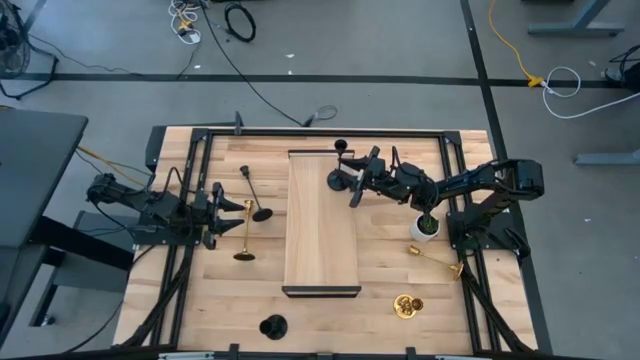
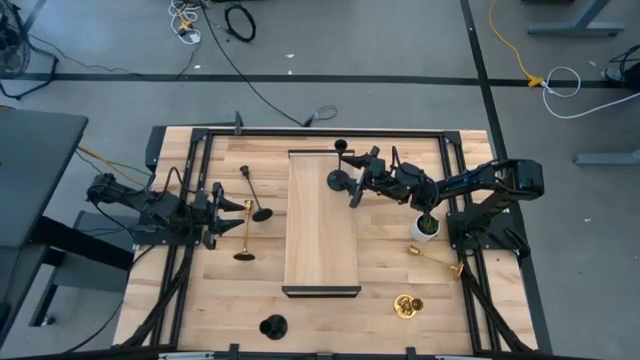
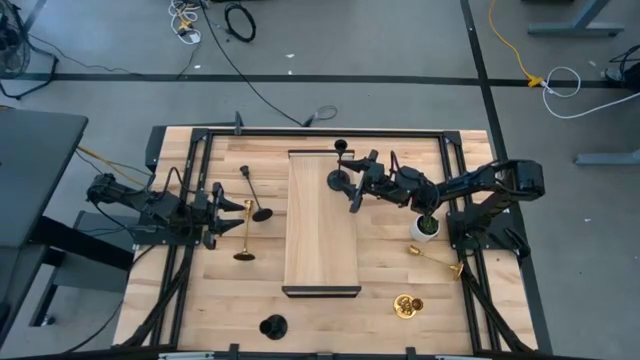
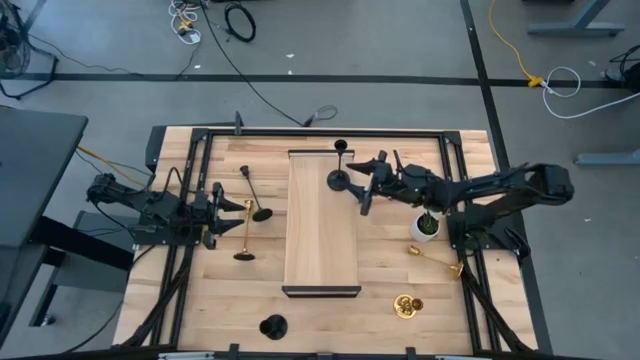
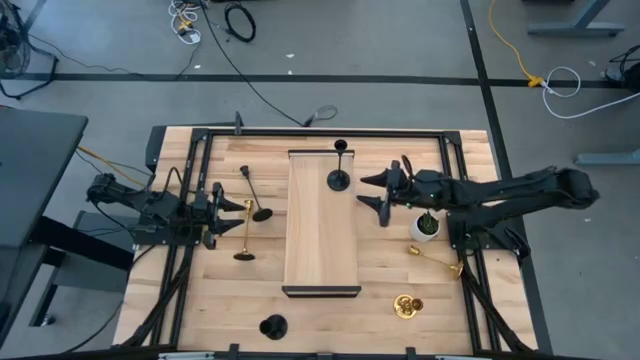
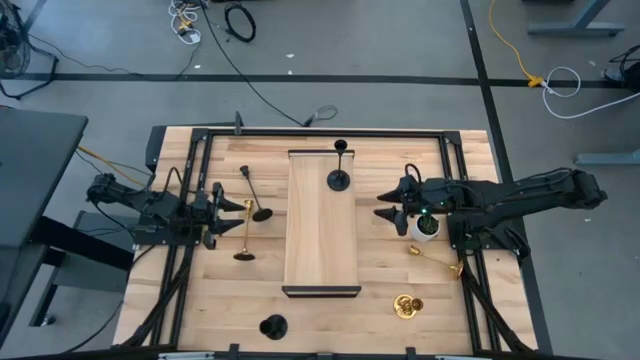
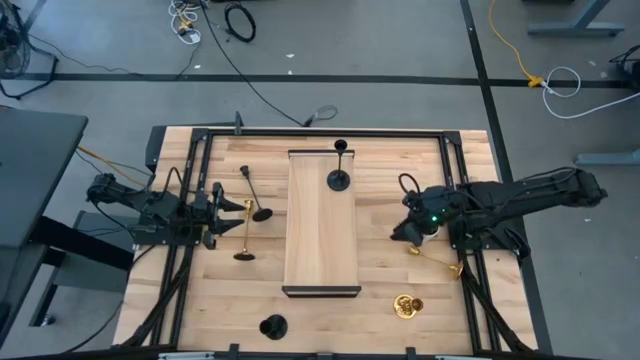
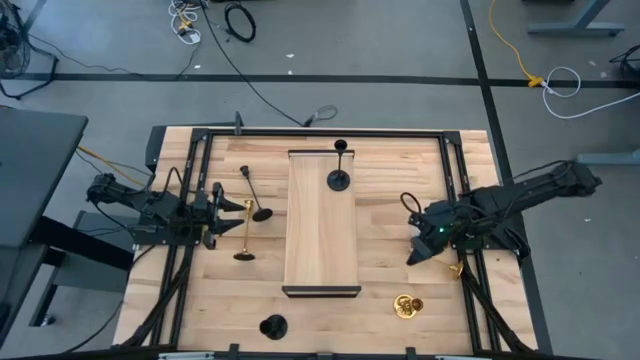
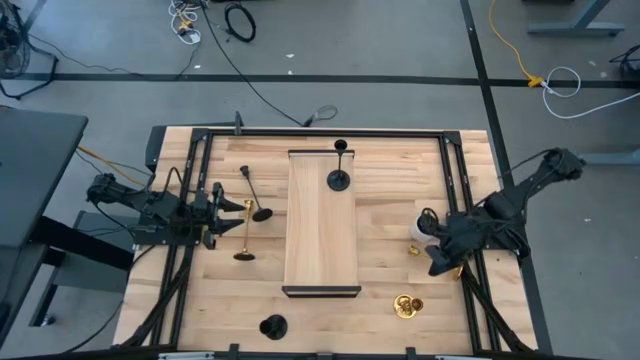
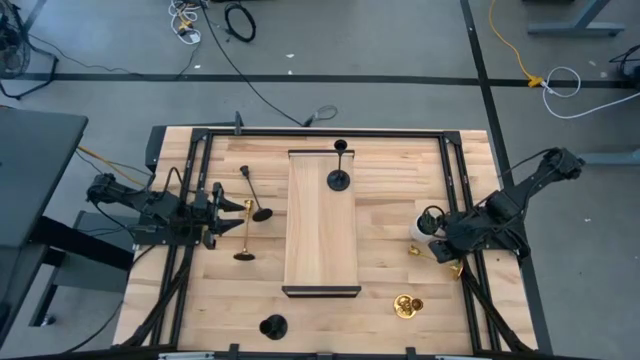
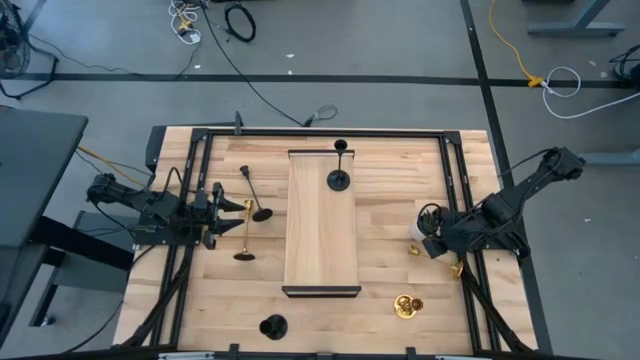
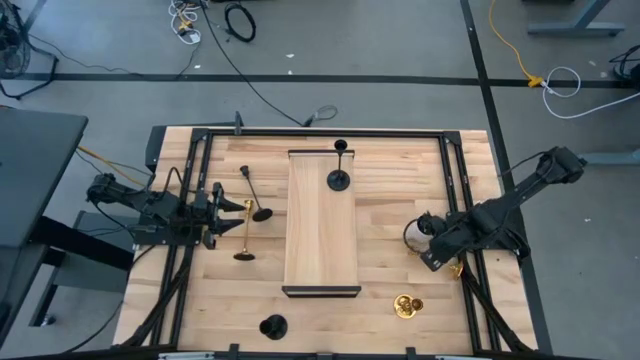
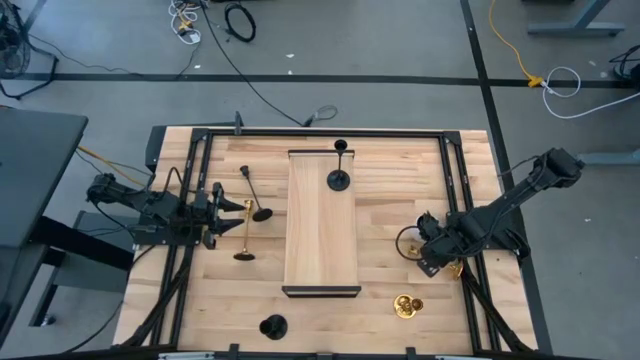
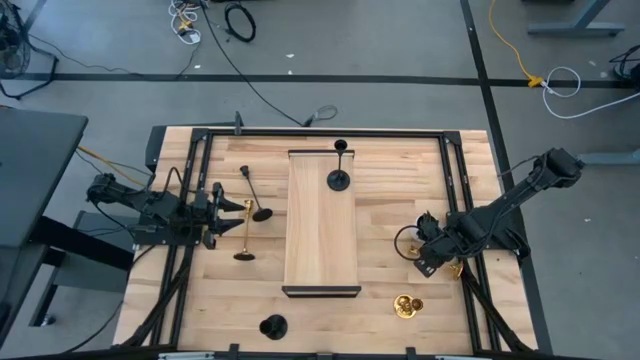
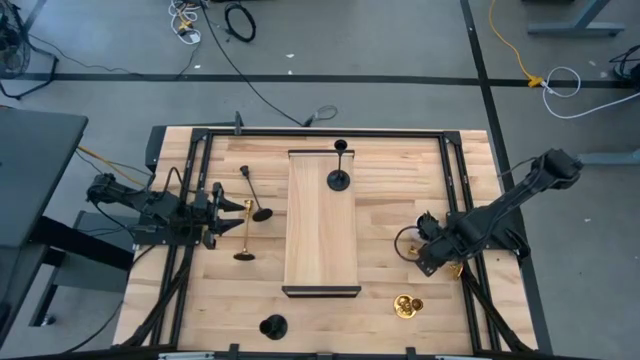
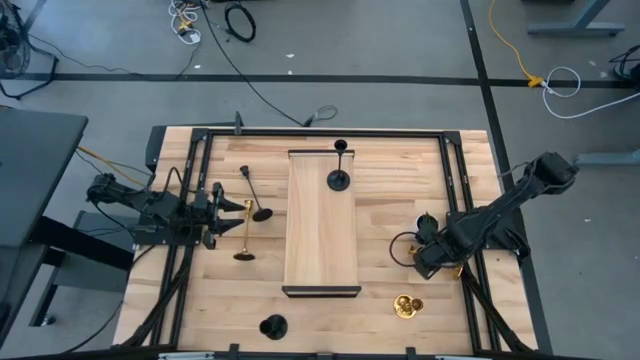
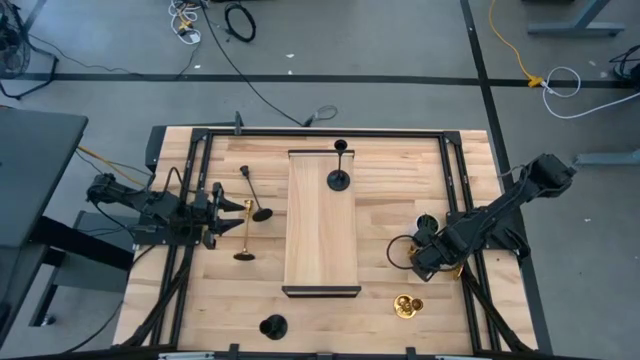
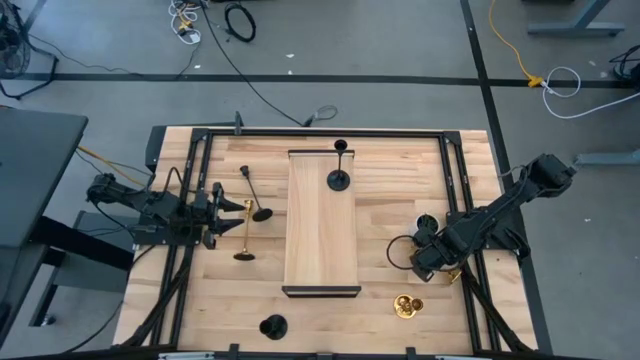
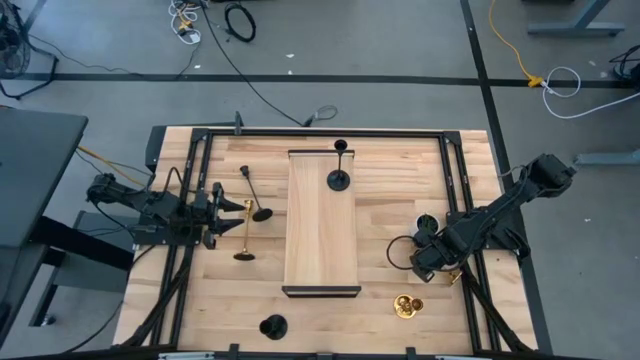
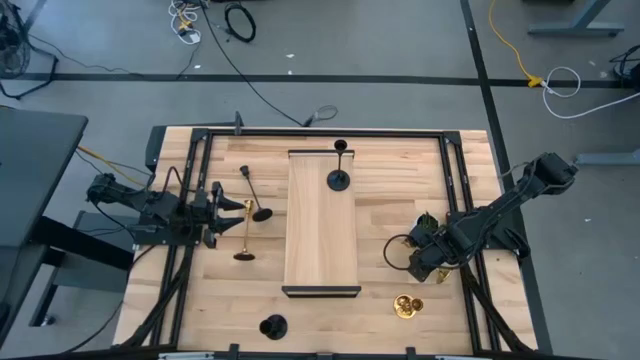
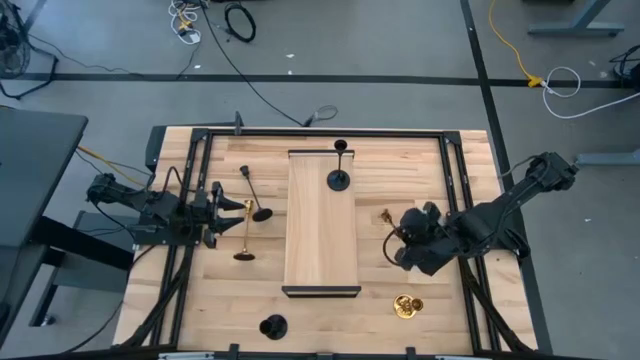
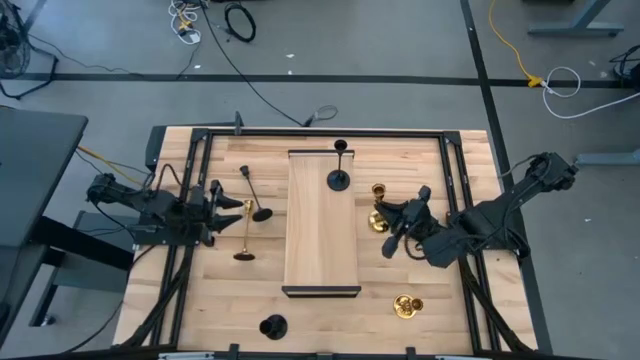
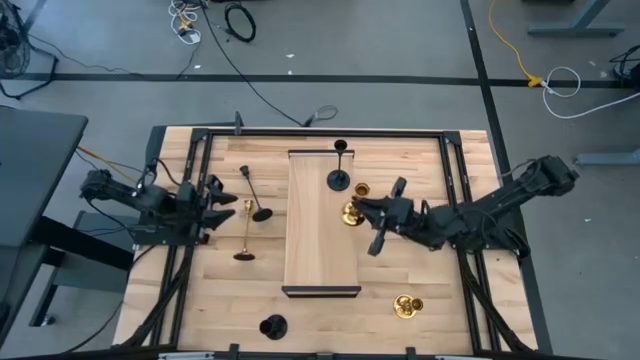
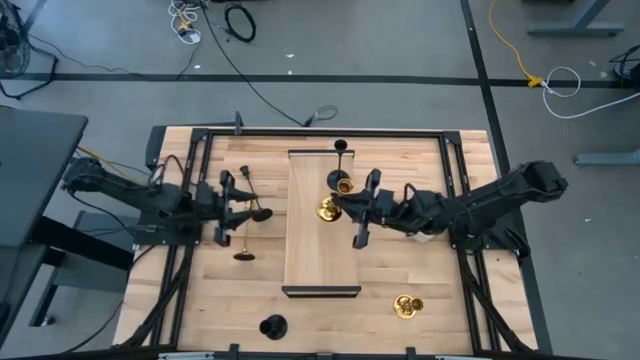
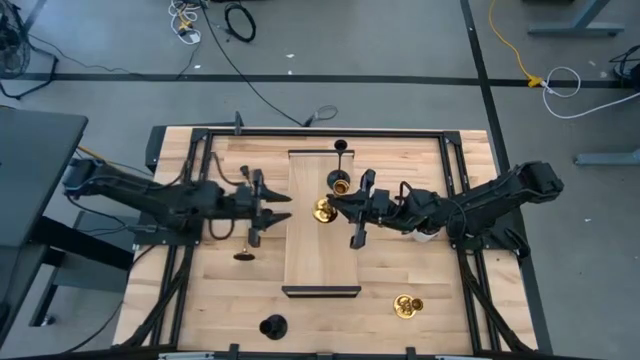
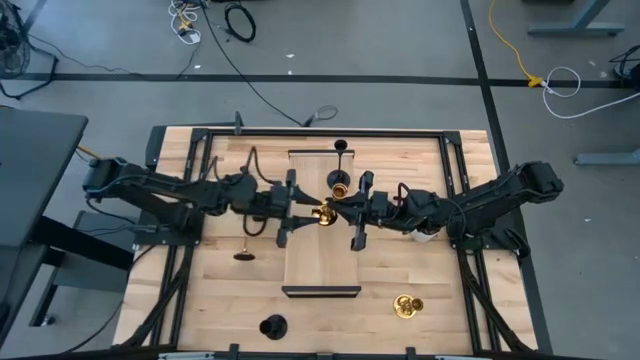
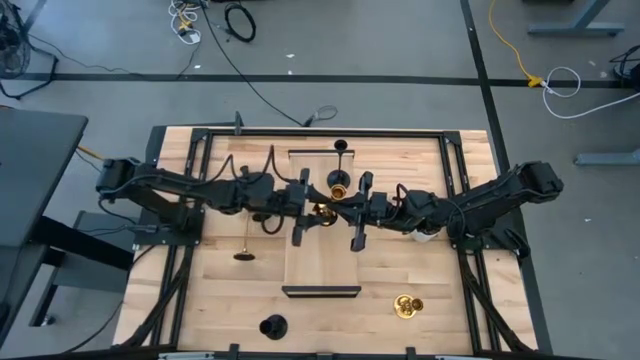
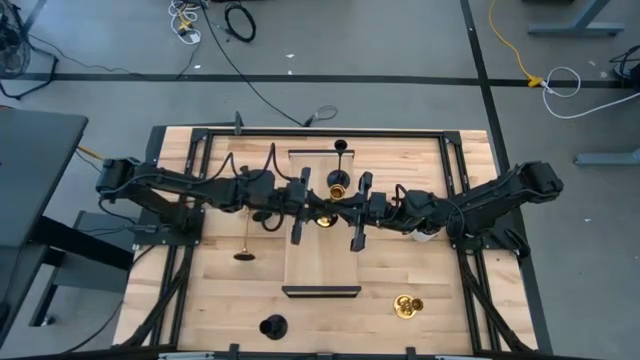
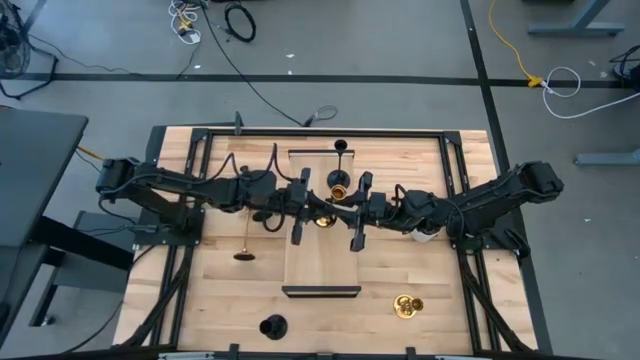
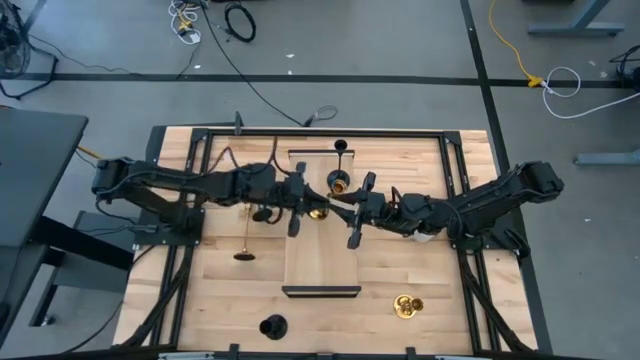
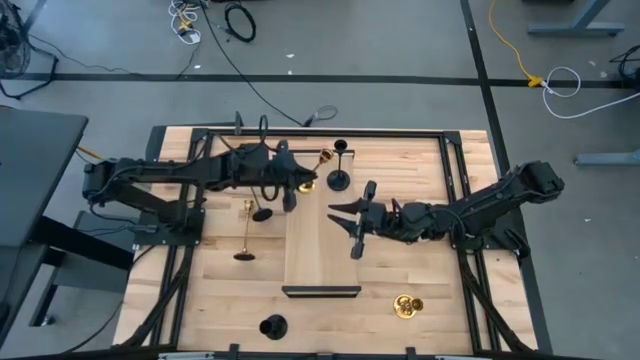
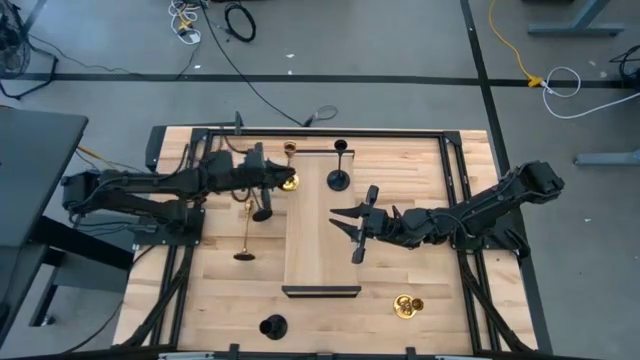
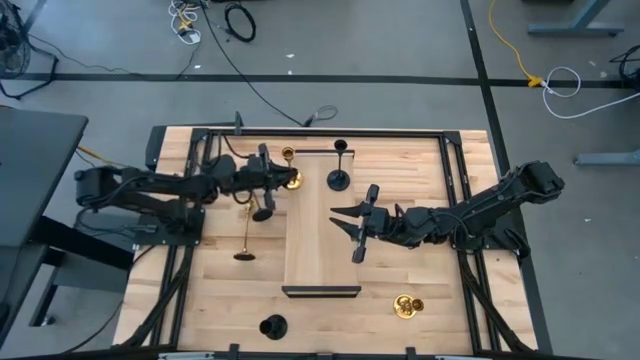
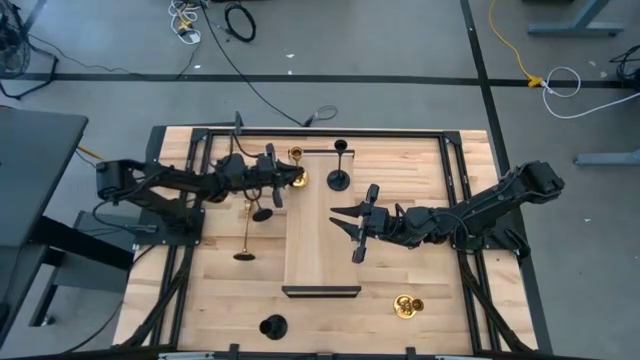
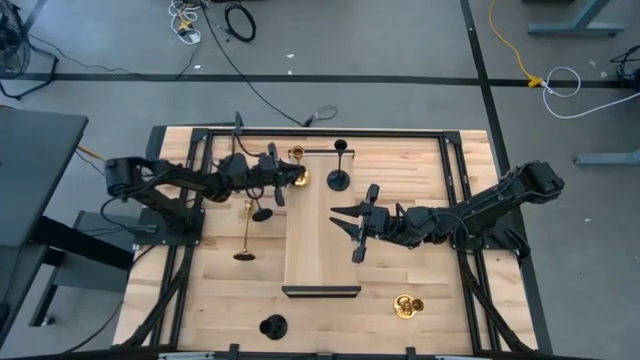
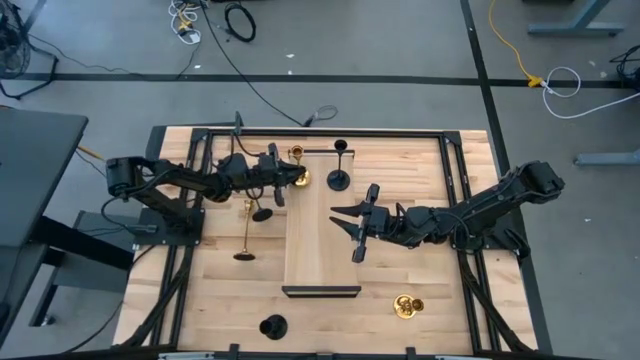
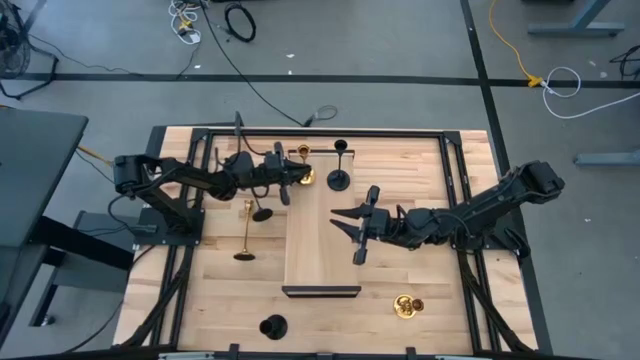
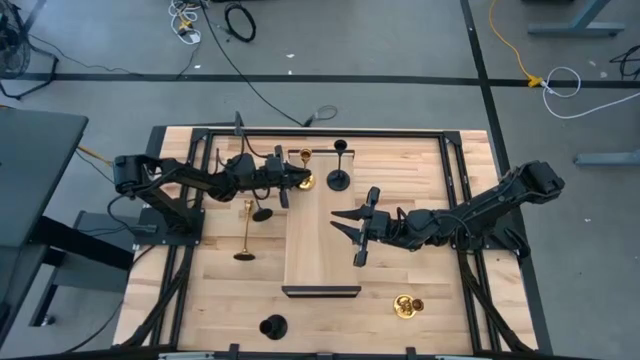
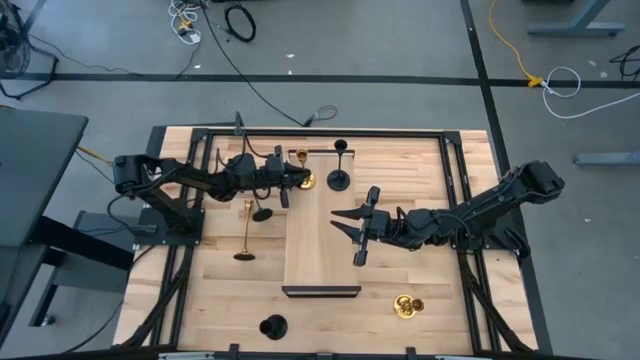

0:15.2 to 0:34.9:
Task: Pick & Place candle stick holders
Put the middle gold candle holder on the shelf

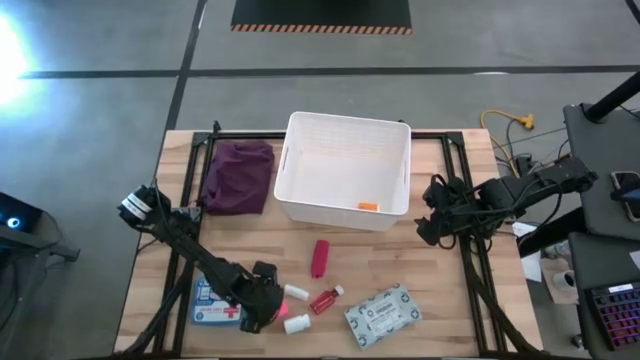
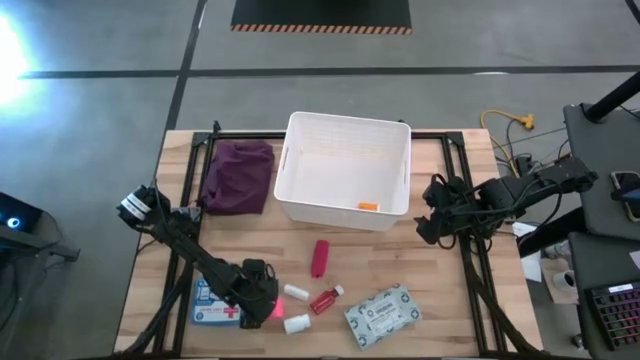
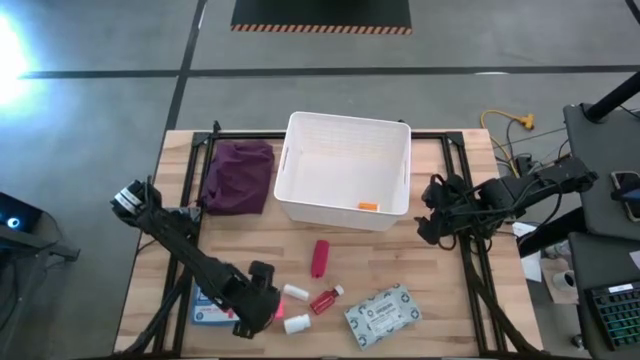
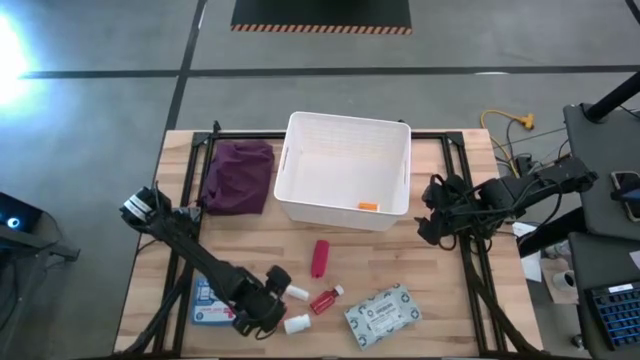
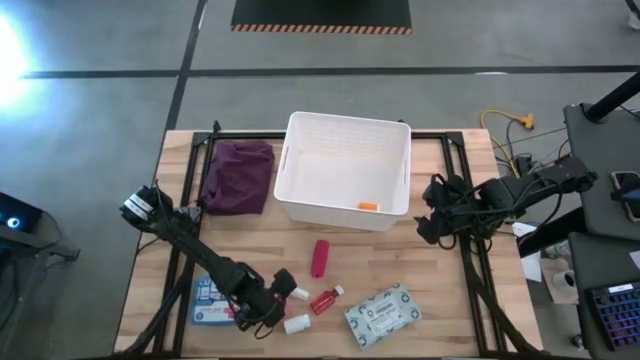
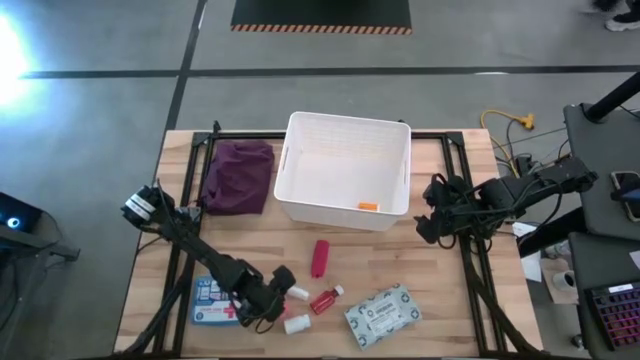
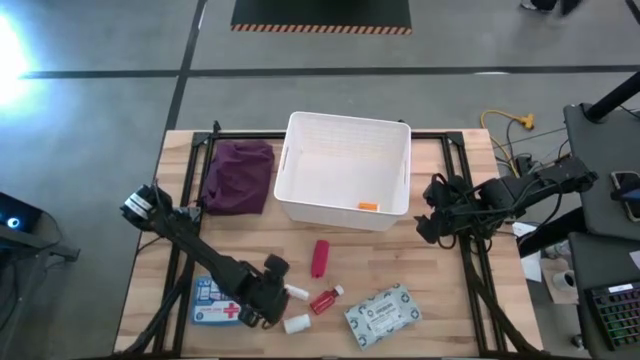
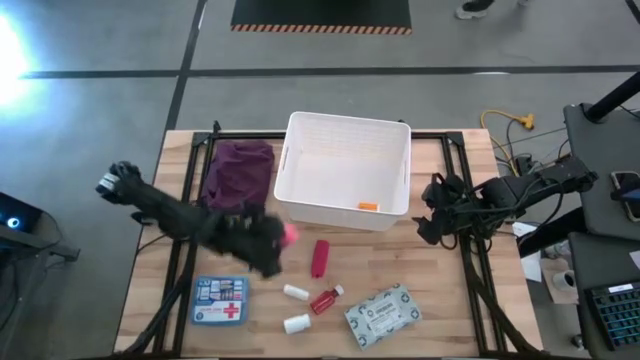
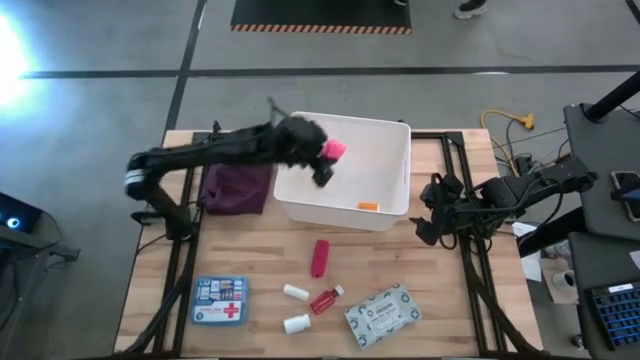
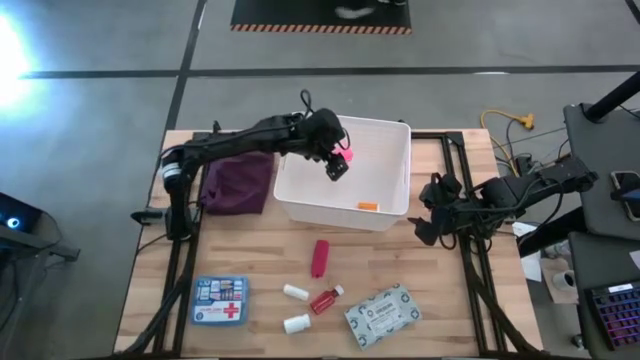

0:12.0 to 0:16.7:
Task: Pick & place medical supplies in basket/bin
Put the pink bandage into the white bin
